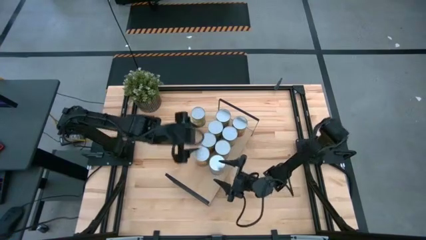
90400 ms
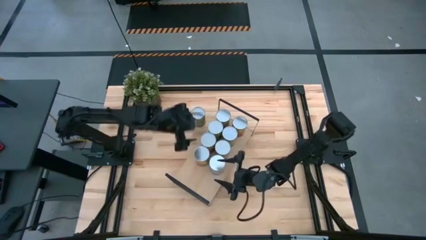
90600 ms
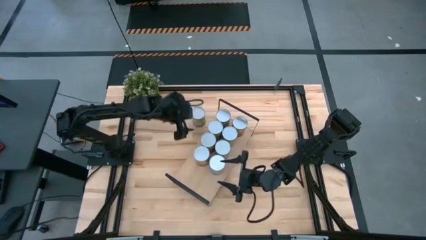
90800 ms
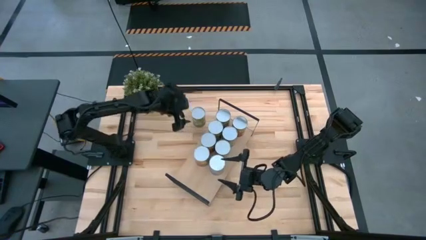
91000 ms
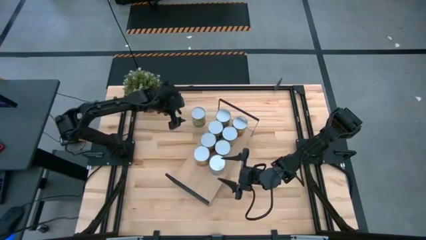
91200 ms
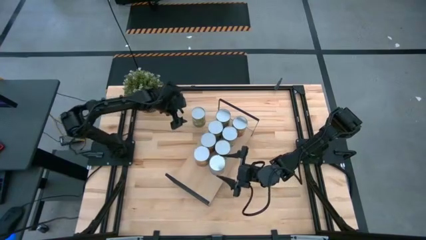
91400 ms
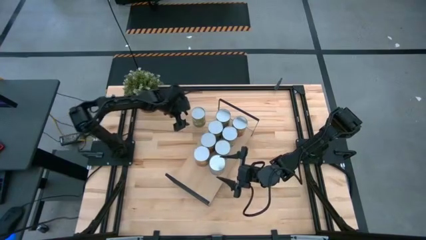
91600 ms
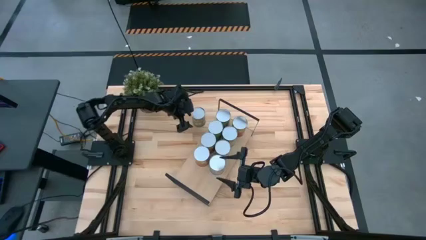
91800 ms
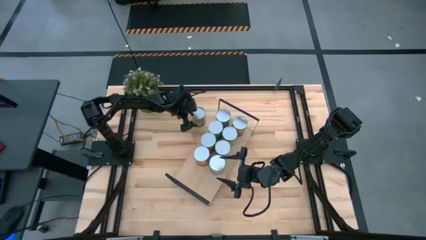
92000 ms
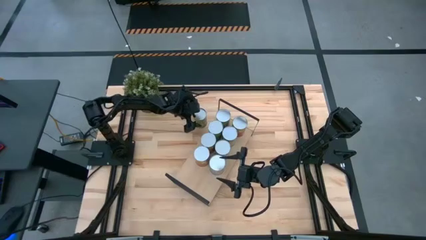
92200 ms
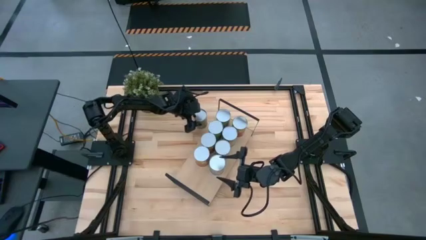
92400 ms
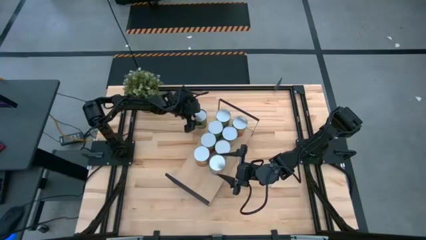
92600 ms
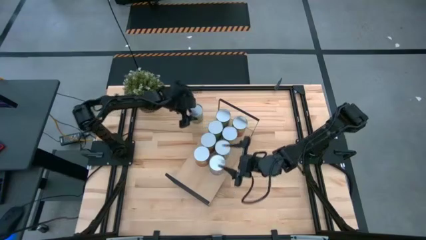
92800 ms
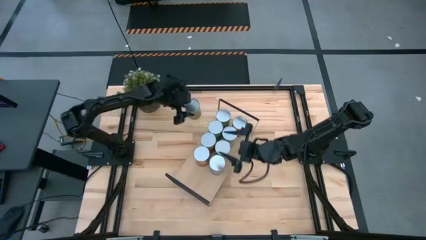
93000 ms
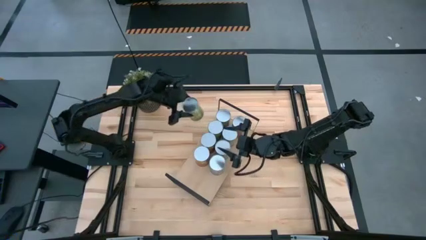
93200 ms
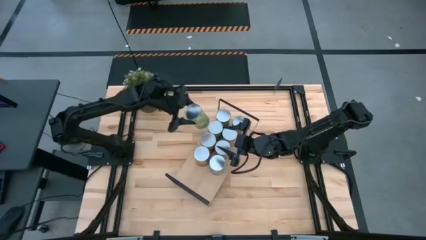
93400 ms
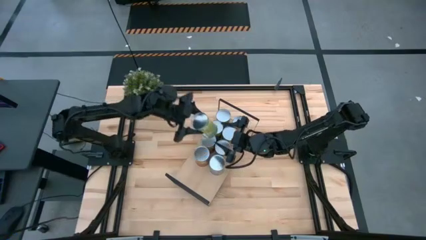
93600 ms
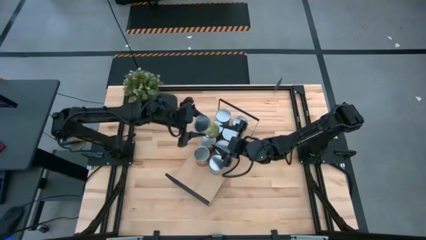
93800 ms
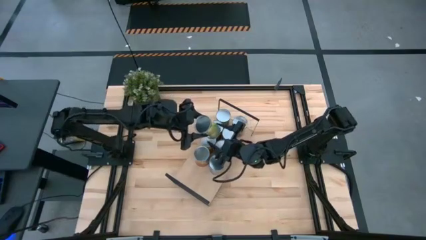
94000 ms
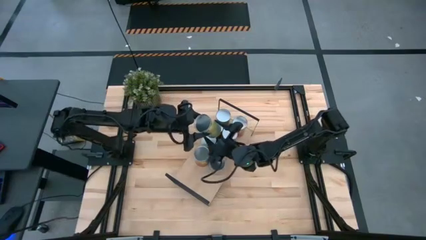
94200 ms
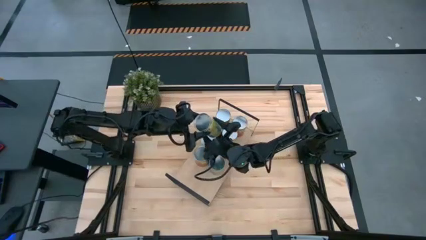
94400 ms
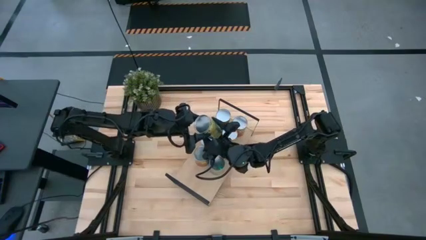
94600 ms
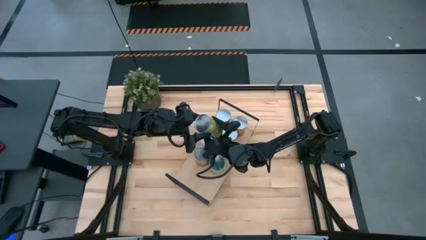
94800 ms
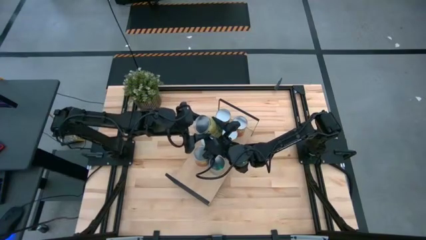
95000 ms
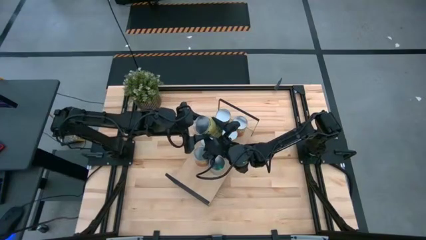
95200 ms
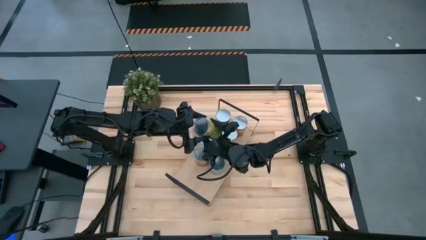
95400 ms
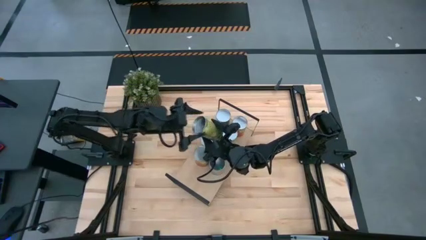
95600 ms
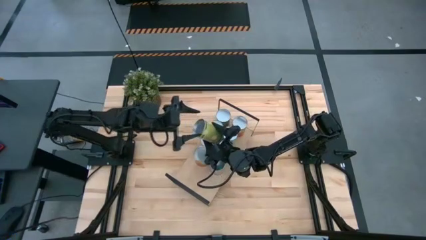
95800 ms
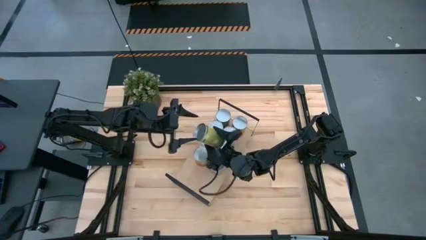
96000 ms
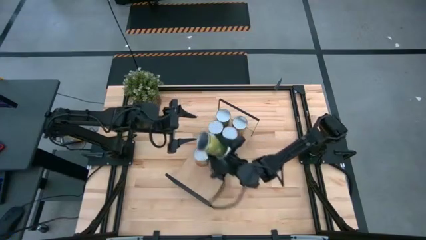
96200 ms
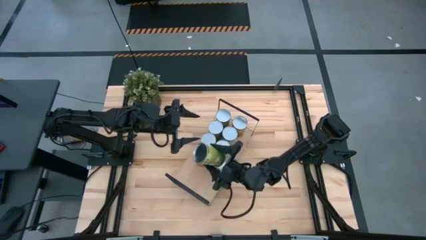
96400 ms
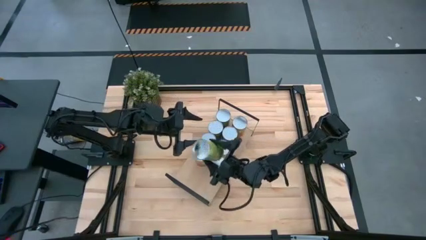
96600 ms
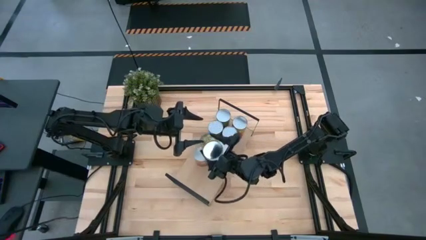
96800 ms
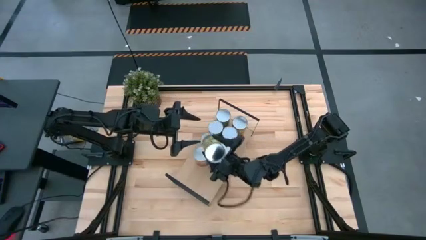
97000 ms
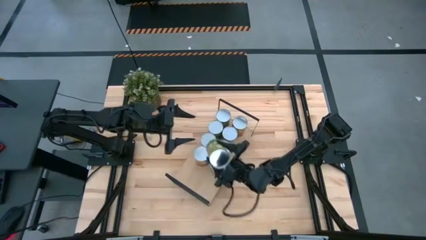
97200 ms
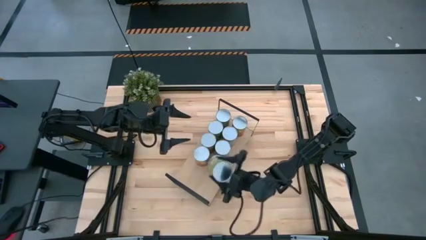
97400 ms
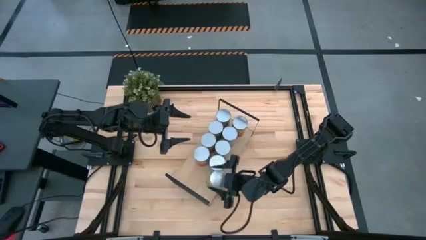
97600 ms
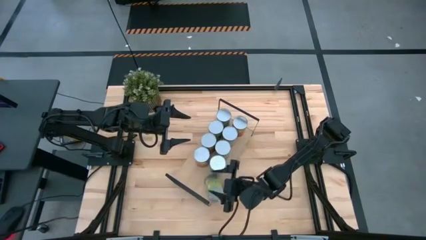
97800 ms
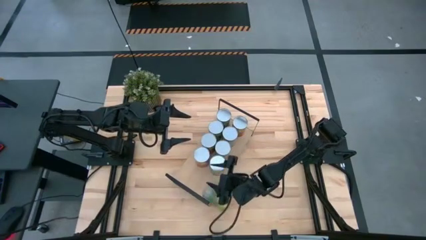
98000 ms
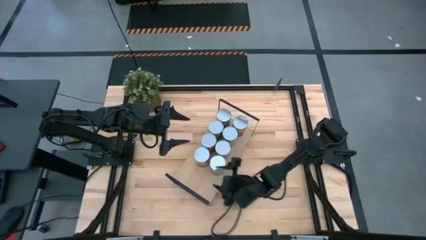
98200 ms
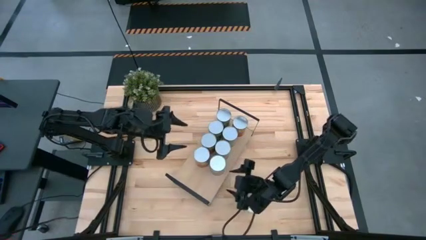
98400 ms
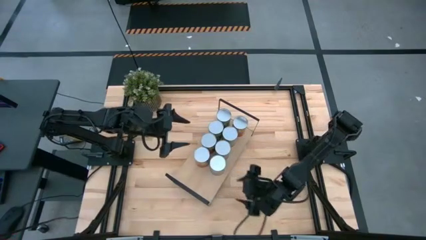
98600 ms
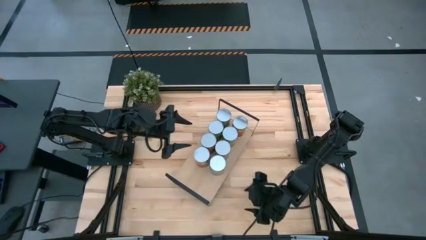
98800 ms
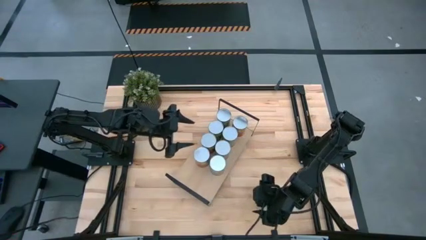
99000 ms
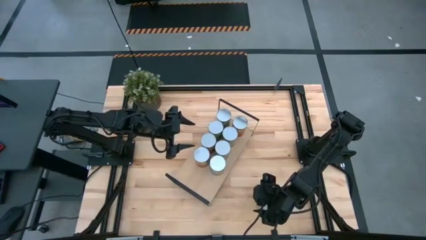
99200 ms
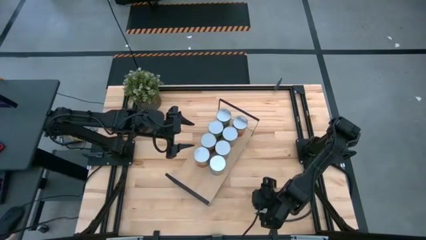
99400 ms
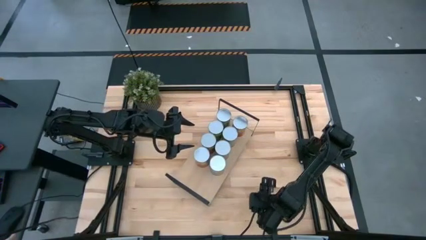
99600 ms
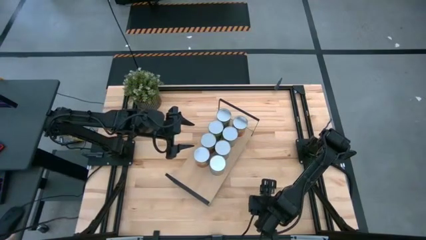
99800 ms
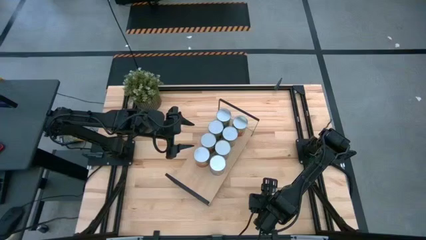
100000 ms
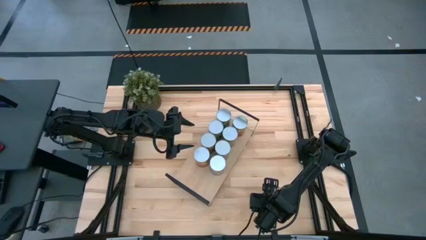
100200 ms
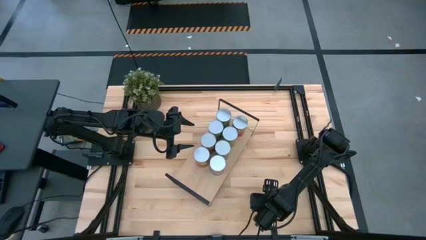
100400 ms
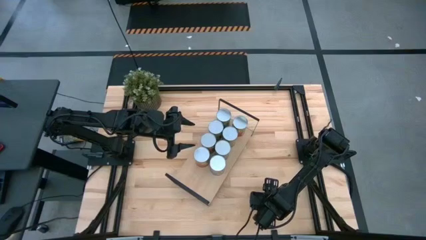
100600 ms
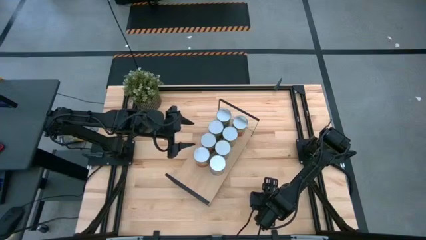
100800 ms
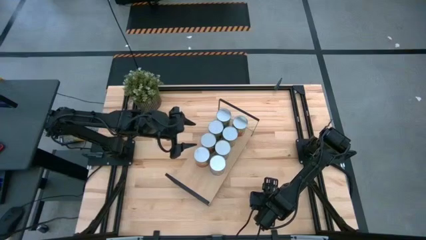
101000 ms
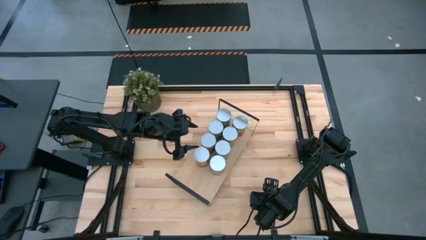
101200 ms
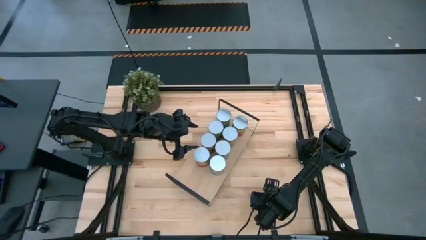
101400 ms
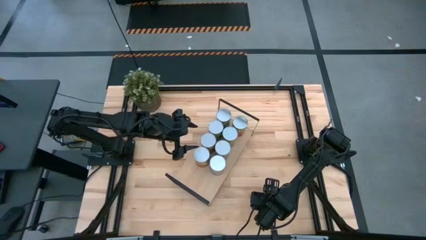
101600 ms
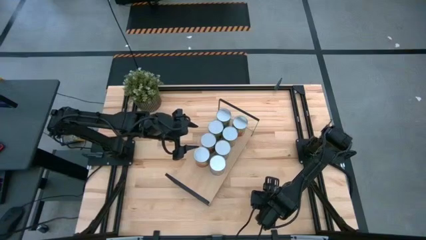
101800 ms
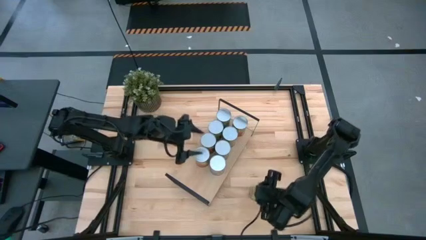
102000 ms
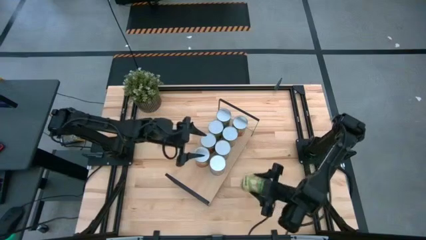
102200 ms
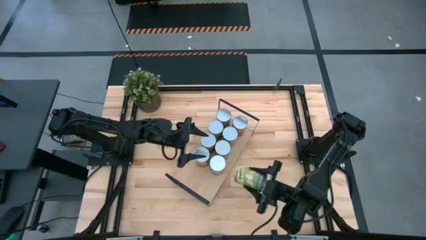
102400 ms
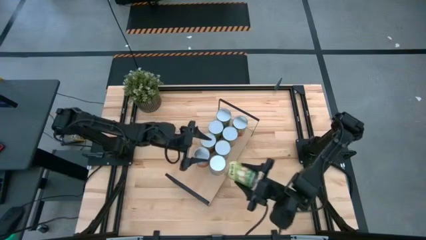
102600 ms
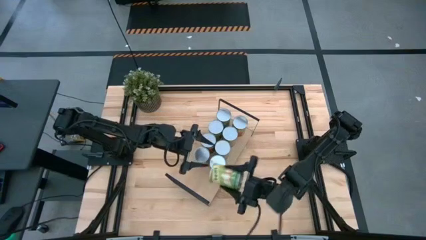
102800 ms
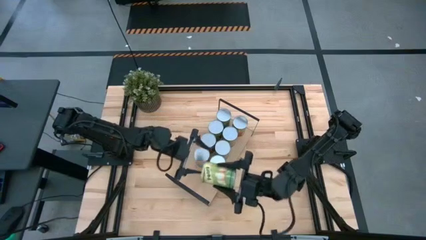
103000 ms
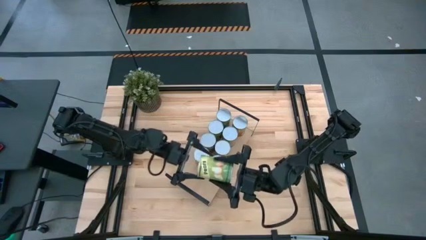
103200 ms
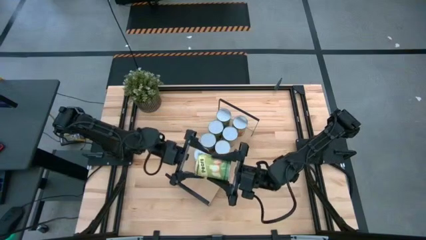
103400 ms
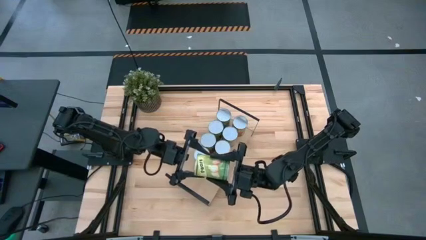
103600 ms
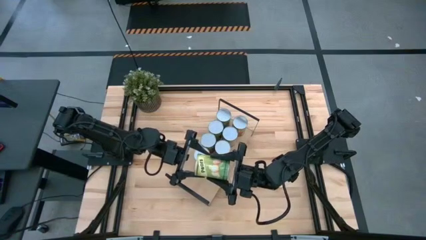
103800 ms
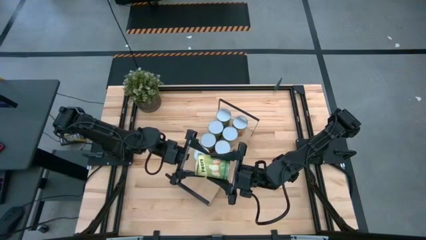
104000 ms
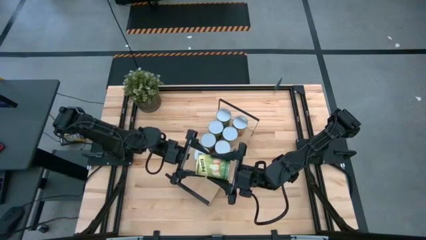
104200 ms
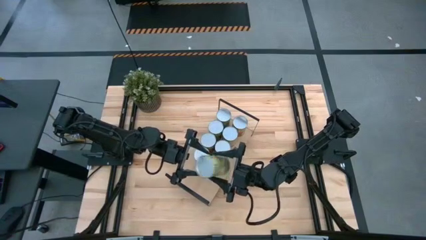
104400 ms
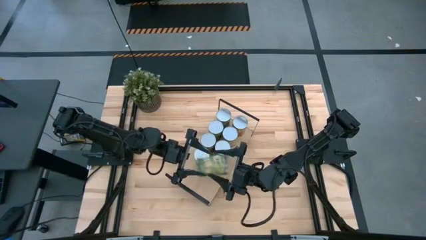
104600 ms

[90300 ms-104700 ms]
Task: Pick and place cans onto a shelf
Put the canned pears on the shelf

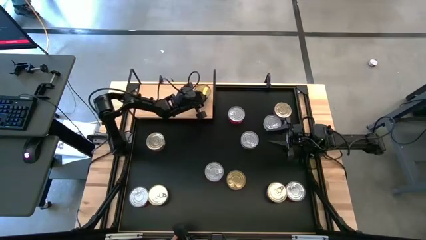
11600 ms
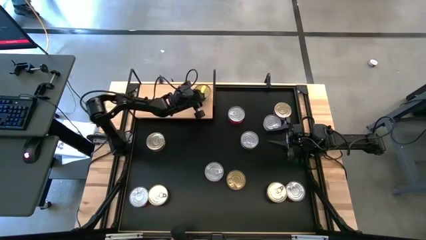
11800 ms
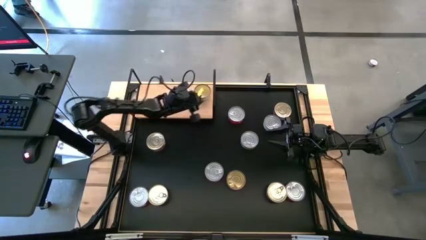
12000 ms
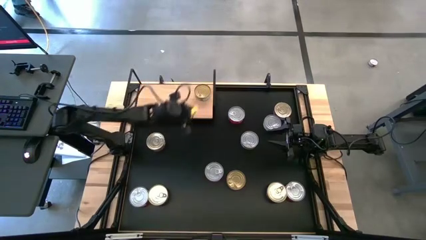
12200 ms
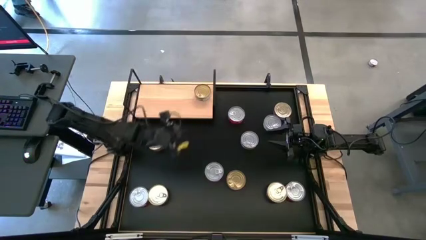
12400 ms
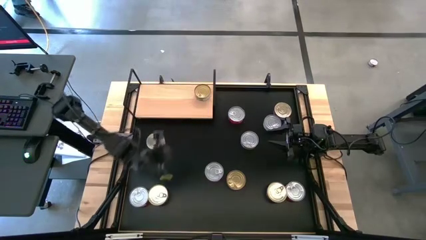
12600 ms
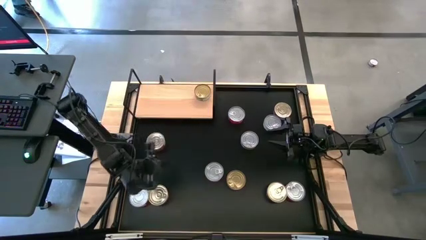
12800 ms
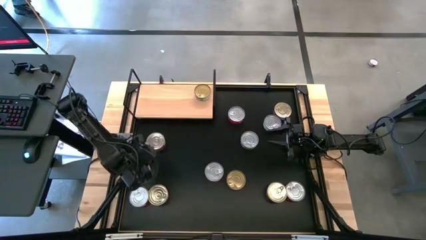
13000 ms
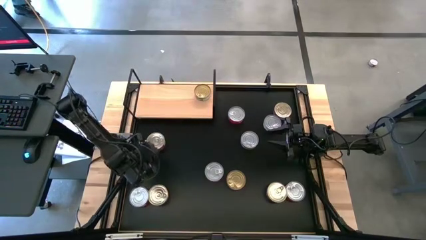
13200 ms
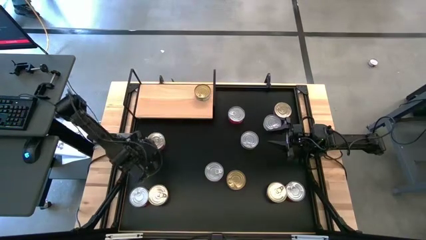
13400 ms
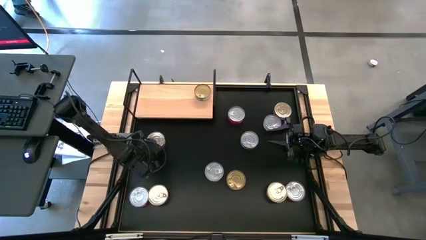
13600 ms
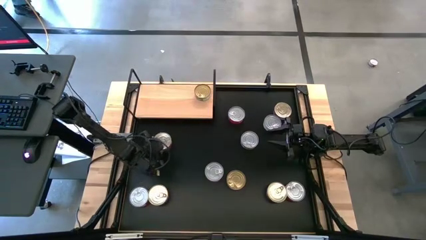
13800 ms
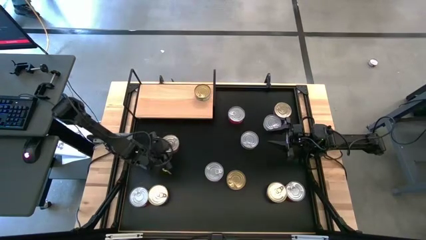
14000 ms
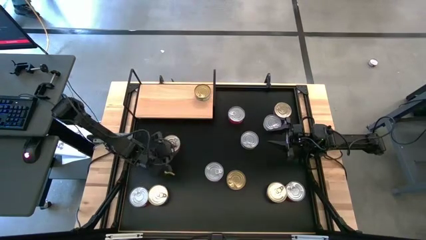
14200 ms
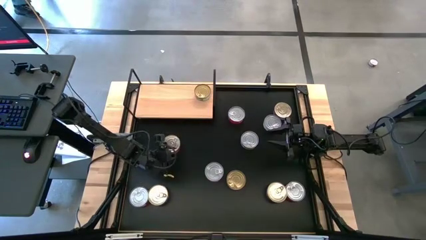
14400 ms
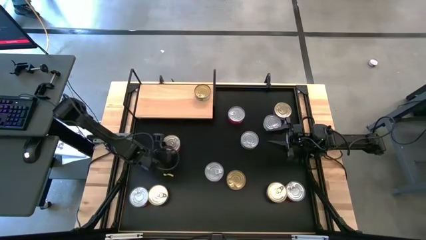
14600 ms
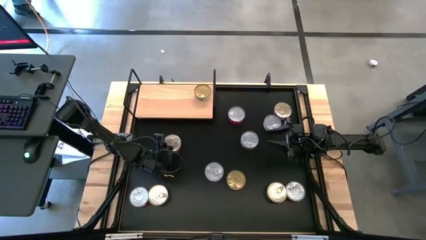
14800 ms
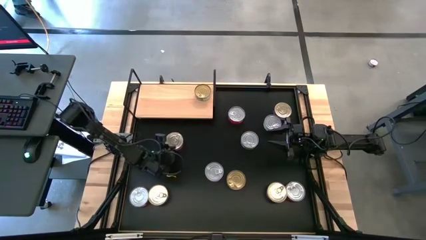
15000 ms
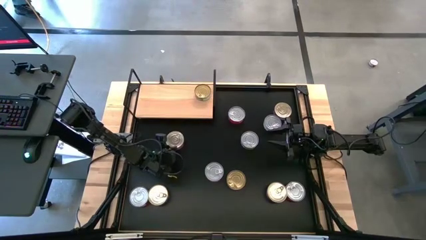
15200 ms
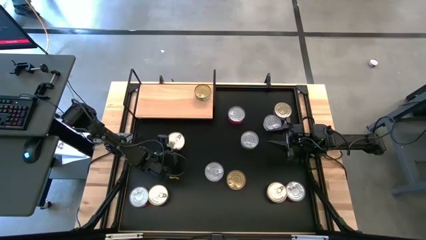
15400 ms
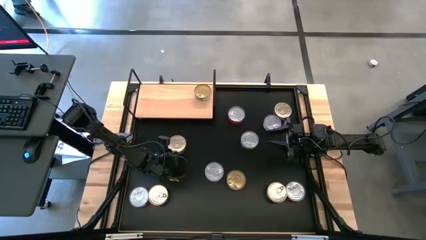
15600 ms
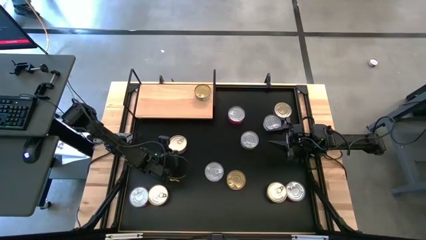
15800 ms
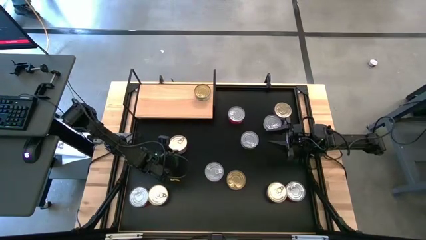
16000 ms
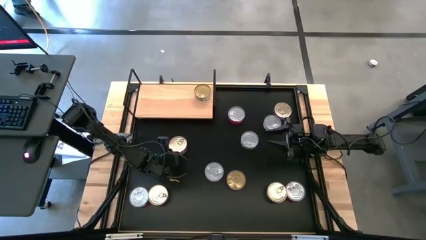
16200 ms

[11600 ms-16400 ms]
Task: Stack canned seafood by type on shelf
Put the pink blue tuna can on the shelf
